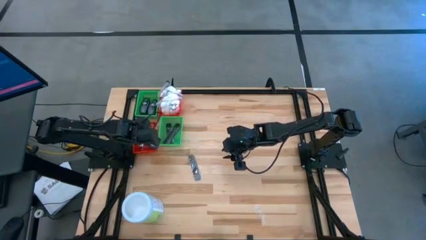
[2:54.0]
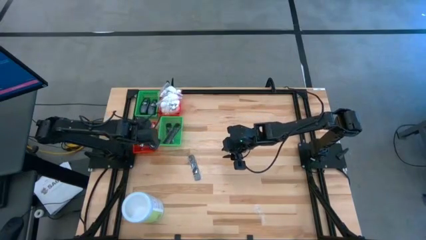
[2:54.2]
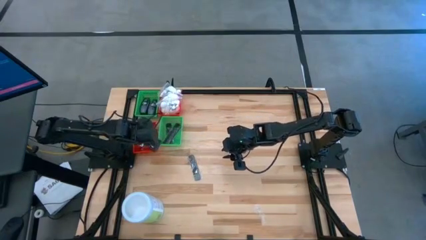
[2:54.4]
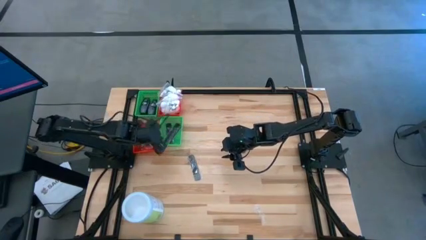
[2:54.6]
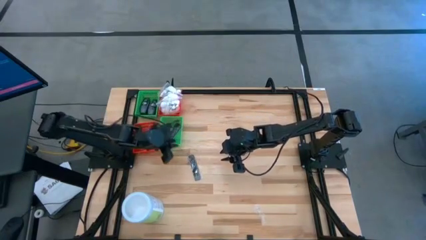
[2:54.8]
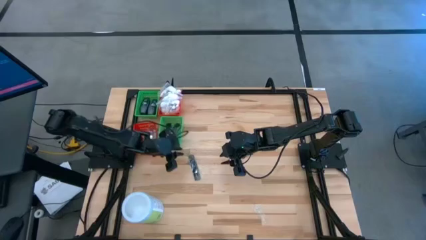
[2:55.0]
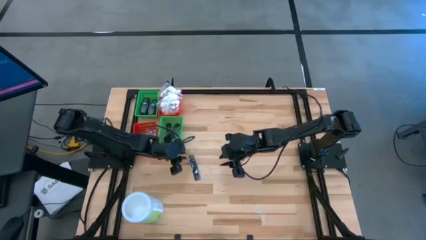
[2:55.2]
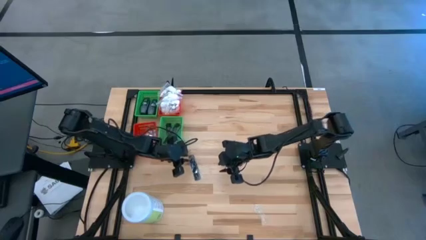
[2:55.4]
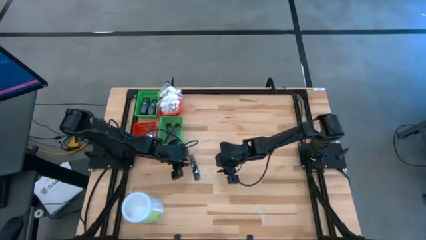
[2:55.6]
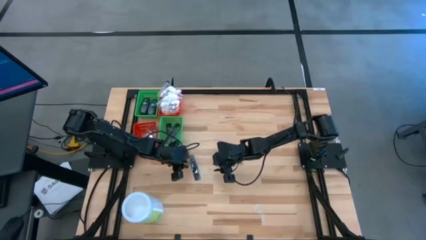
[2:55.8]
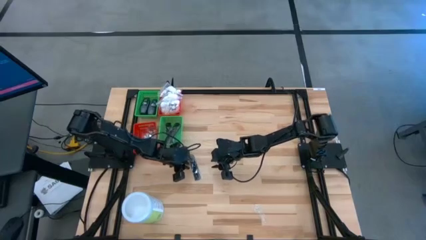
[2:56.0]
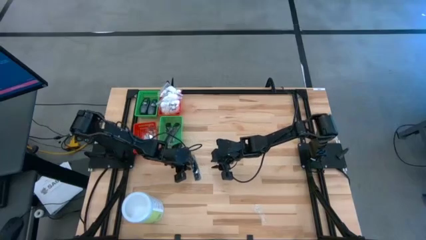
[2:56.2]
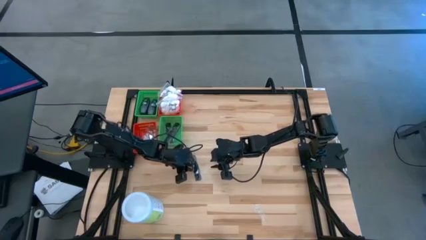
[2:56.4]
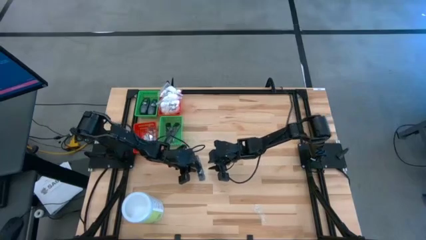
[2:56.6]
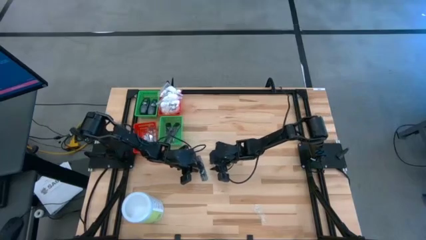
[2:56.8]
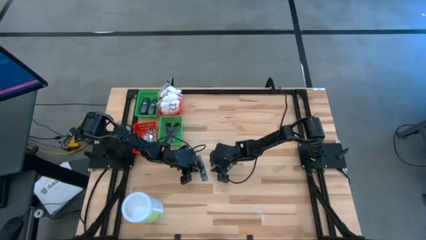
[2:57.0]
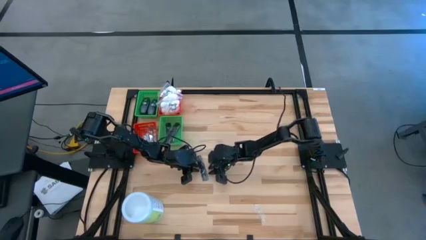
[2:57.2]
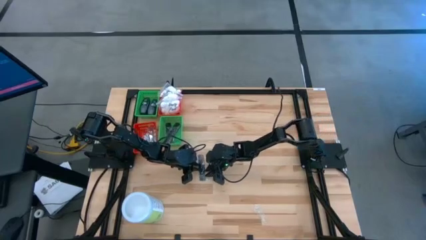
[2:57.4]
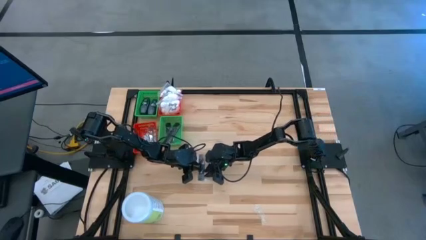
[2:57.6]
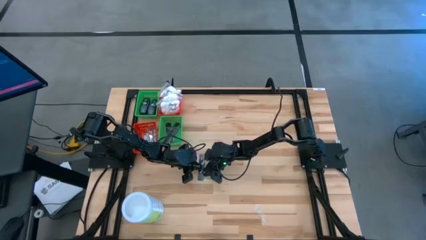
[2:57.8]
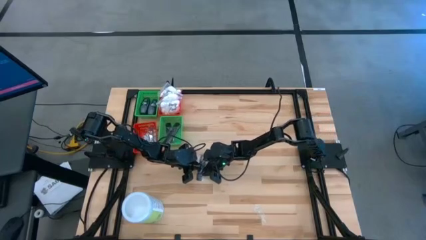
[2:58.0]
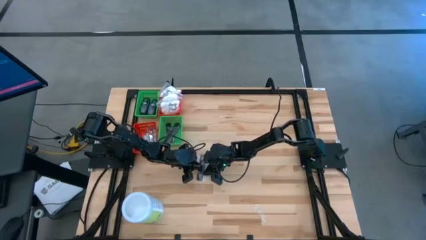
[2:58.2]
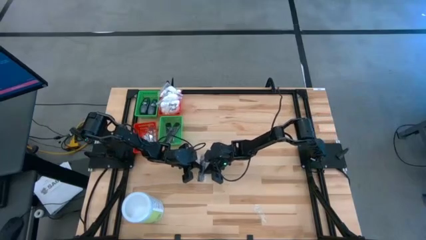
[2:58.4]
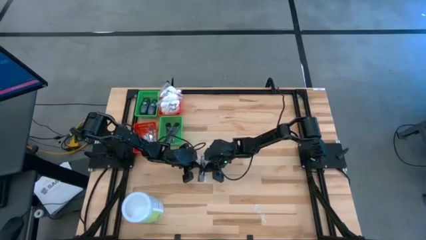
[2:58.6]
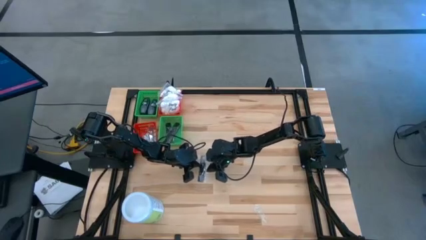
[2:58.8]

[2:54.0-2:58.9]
Task: Pick & Place Travel size toiletries
Put the black comb into the bottom green bin

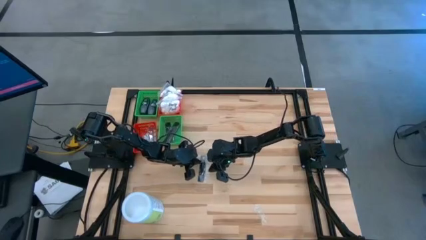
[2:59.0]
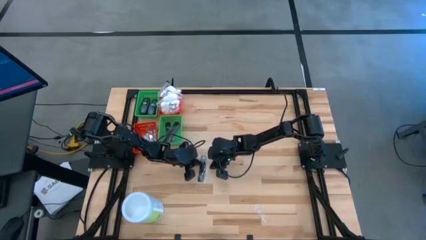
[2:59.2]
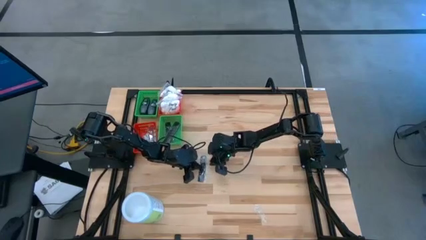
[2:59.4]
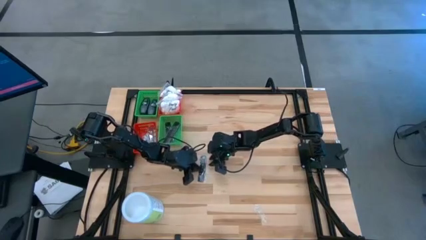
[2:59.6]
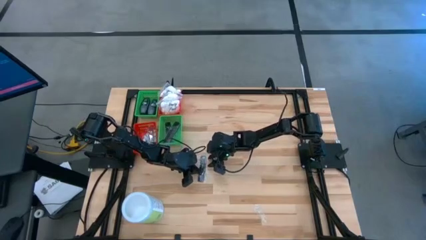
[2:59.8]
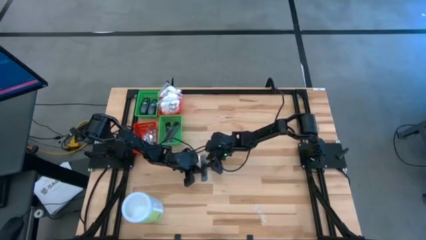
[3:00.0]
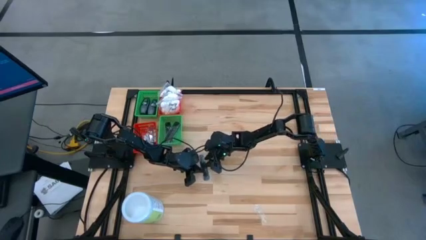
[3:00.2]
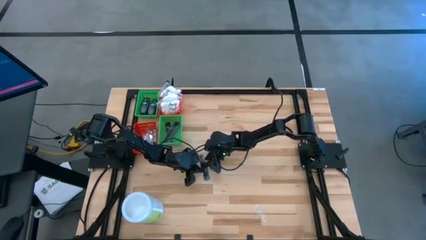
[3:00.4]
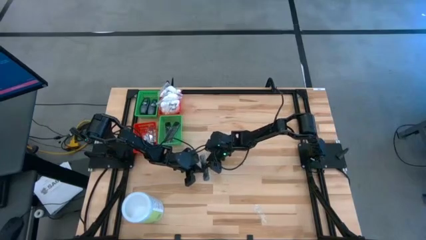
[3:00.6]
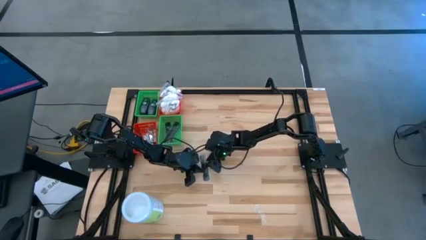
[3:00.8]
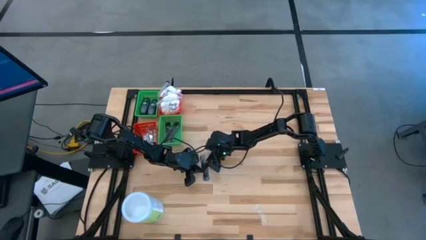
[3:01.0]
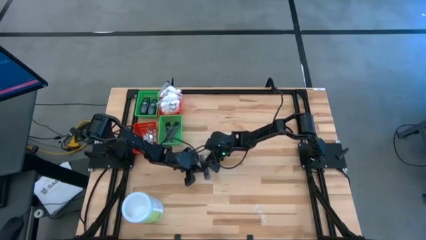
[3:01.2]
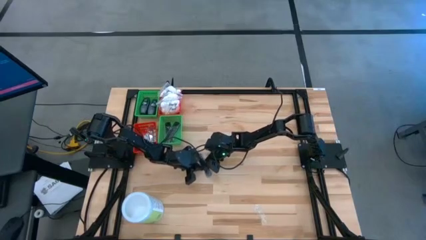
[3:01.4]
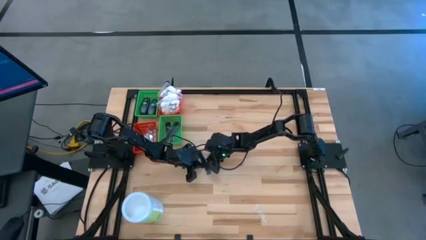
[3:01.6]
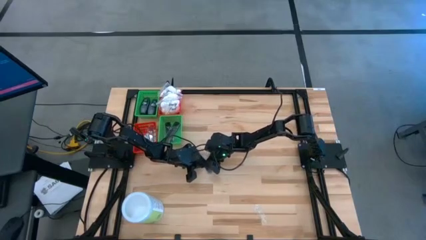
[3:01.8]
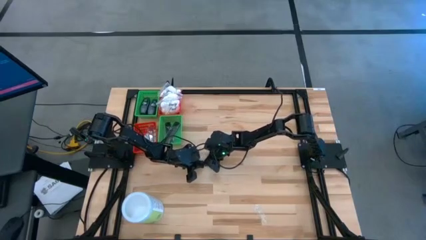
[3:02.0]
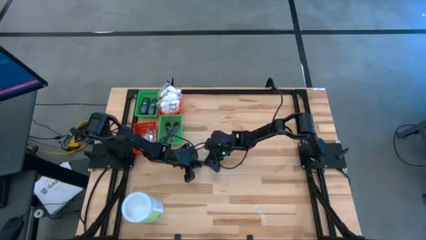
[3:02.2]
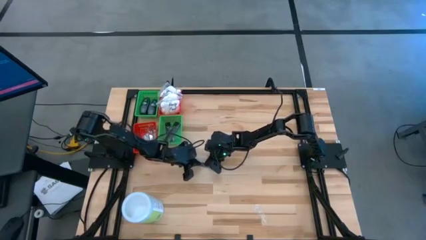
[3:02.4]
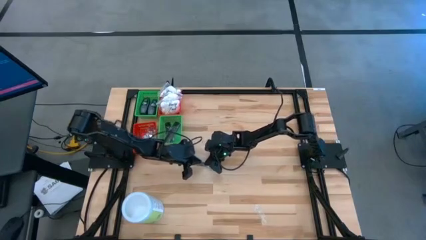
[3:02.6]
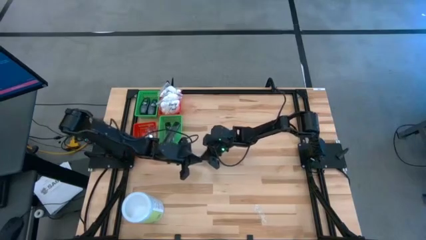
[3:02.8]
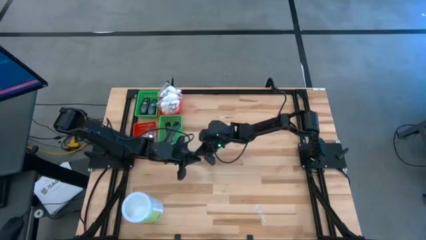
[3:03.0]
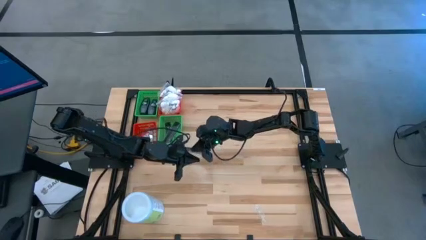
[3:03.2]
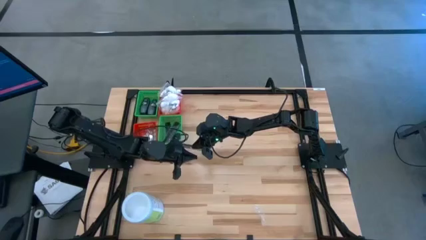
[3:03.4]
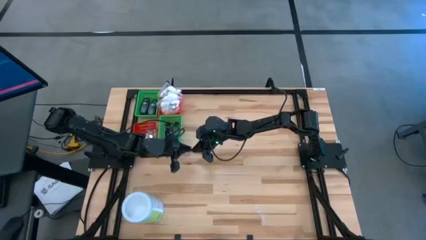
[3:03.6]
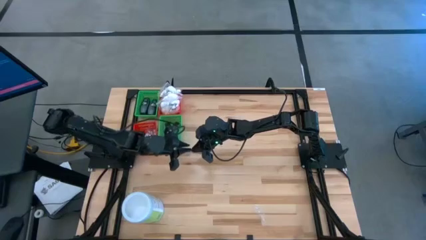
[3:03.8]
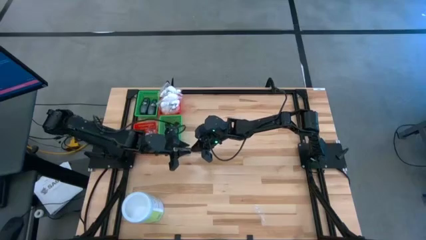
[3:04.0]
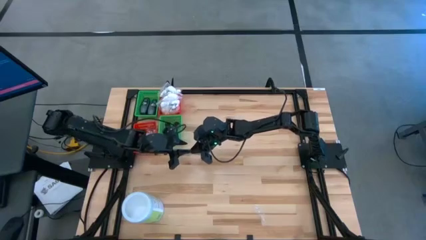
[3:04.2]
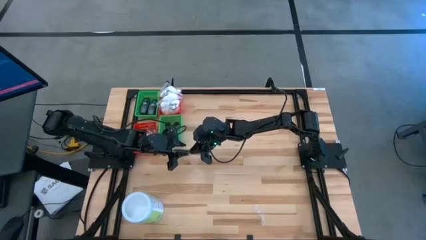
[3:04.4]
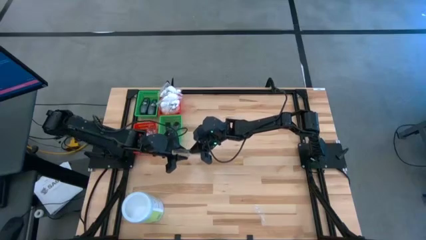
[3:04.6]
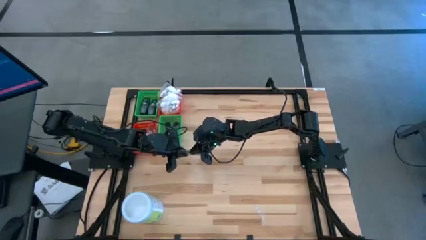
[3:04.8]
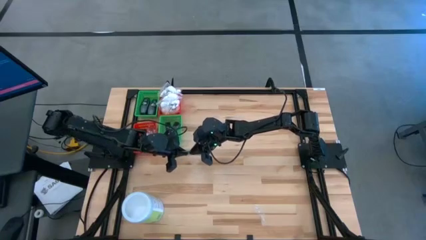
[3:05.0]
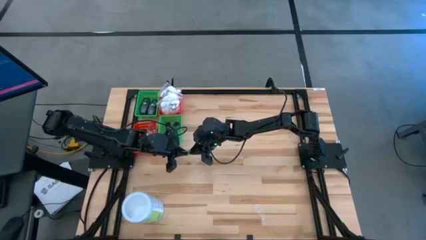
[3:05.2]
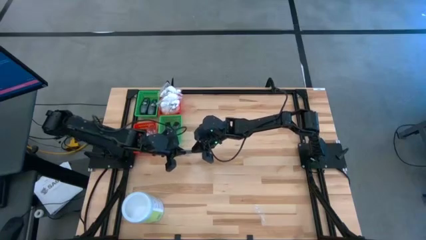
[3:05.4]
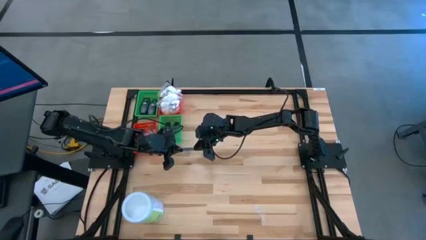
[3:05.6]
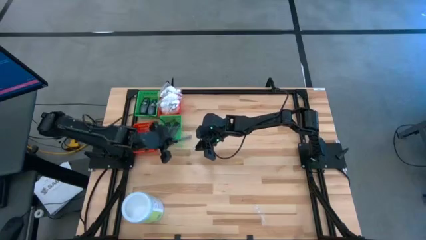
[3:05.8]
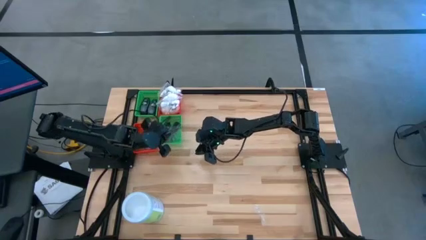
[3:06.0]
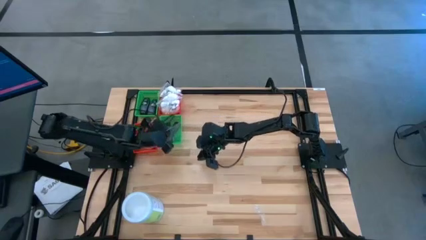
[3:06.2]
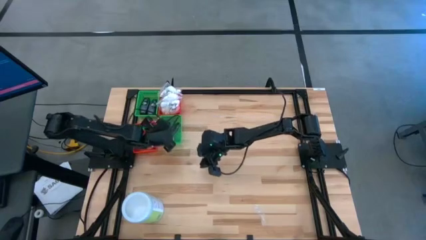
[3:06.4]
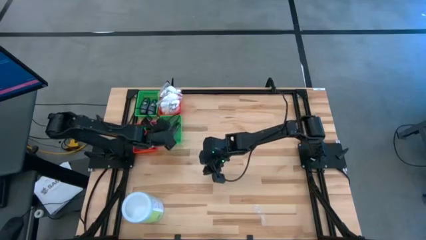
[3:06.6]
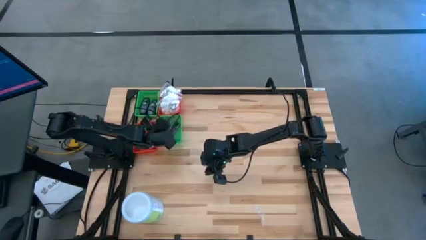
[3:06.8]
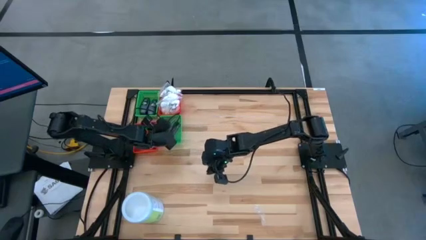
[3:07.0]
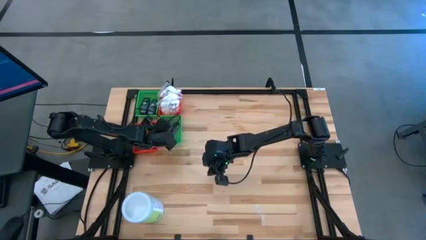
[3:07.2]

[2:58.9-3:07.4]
Put the black comb into the bottom green bin

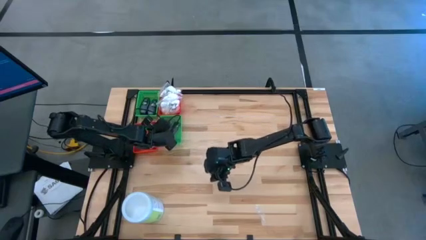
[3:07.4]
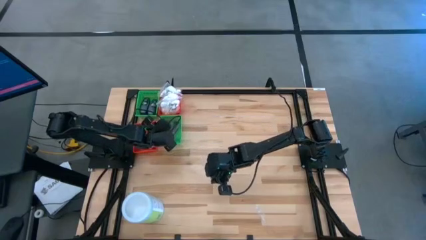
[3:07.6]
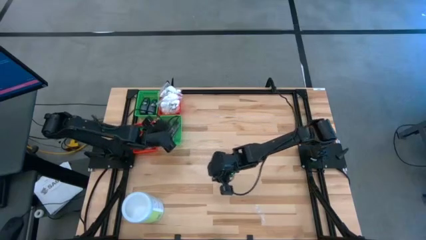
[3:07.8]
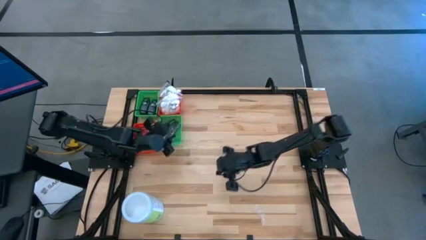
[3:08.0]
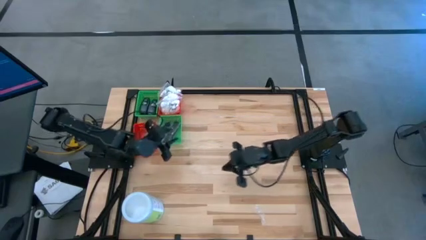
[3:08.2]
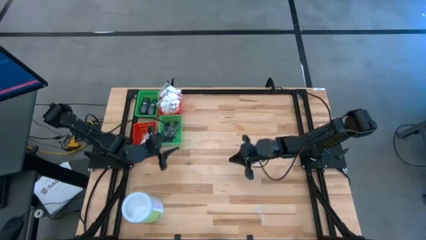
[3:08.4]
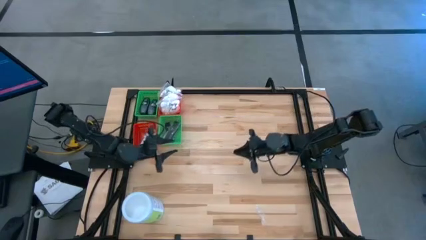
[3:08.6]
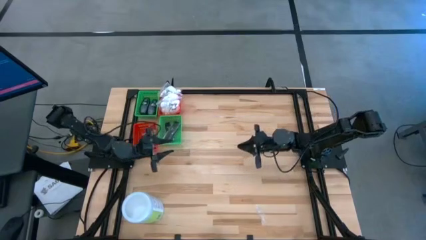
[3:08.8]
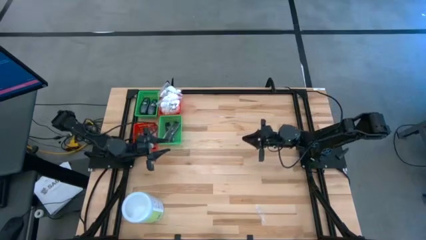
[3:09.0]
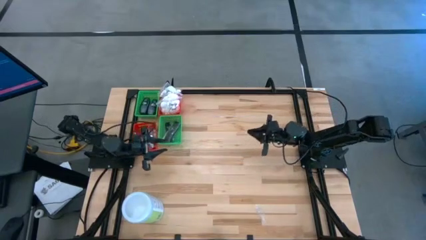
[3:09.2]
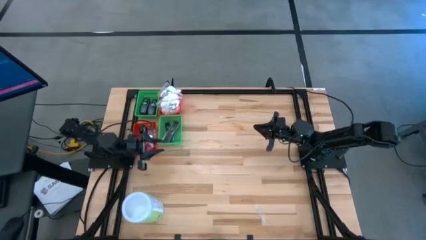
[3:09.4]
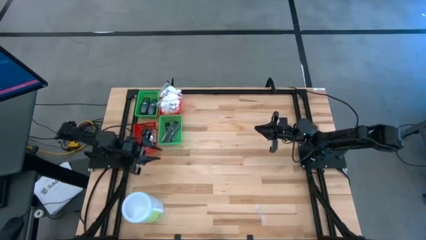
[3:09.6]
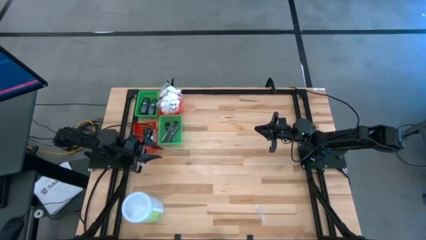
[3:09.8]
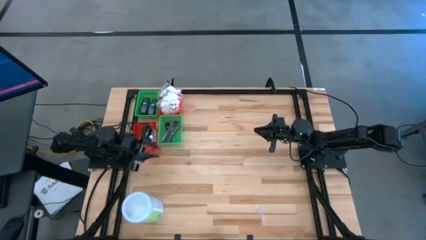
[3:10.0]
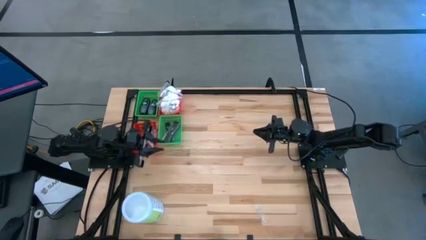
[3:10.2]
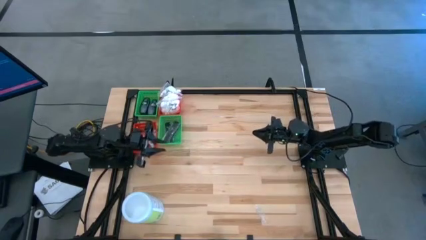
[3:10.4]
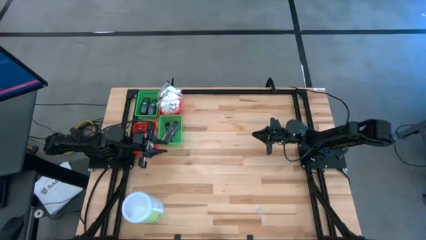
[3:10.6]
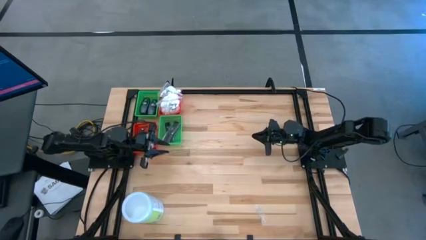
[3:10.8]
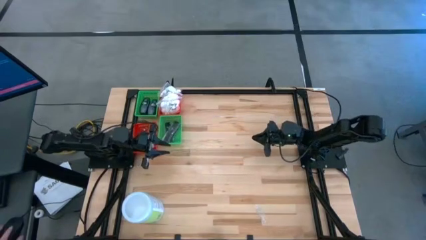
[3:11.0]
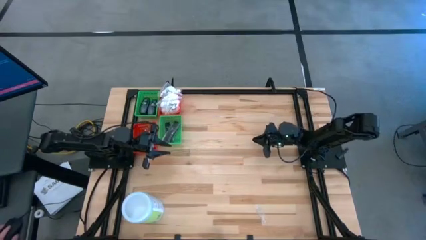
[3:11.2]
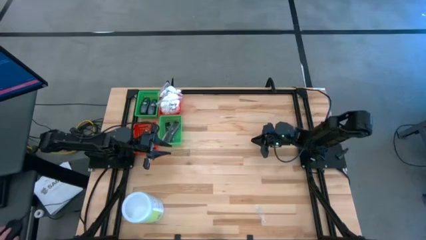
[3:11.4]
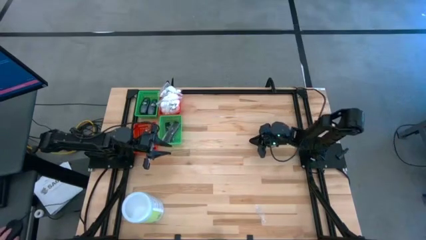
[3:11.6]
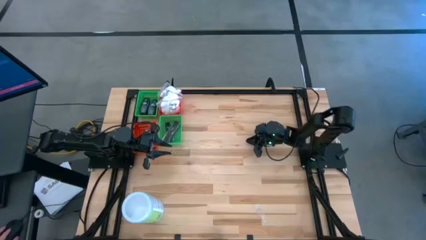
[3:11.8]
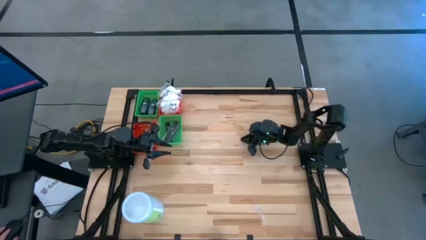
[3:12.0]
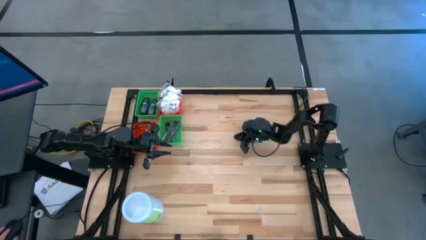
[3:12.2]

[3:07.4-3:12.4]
Return to Home Position
